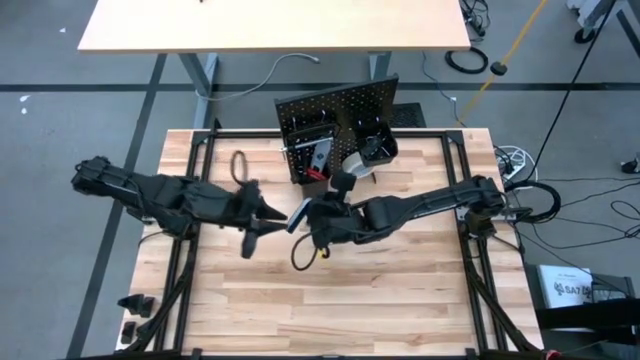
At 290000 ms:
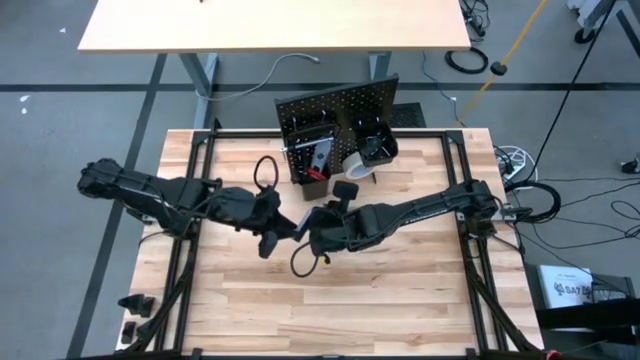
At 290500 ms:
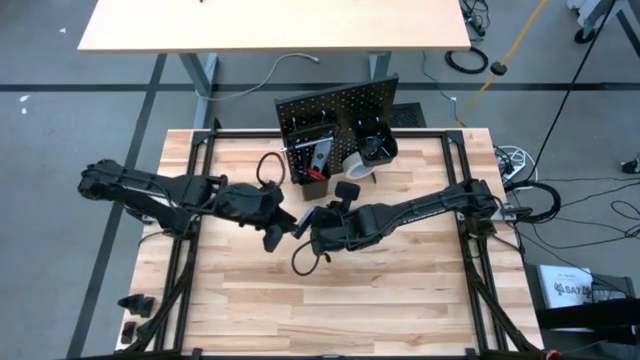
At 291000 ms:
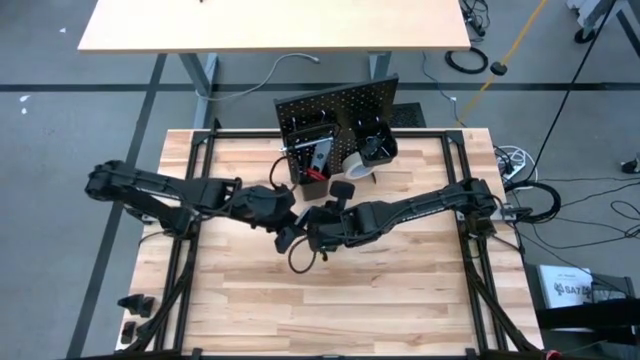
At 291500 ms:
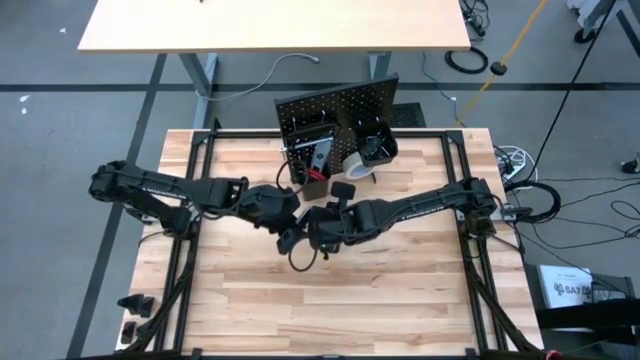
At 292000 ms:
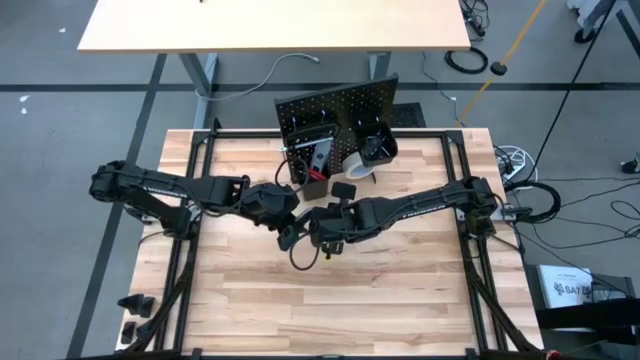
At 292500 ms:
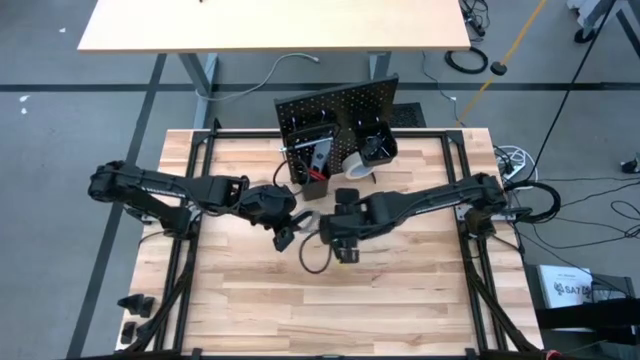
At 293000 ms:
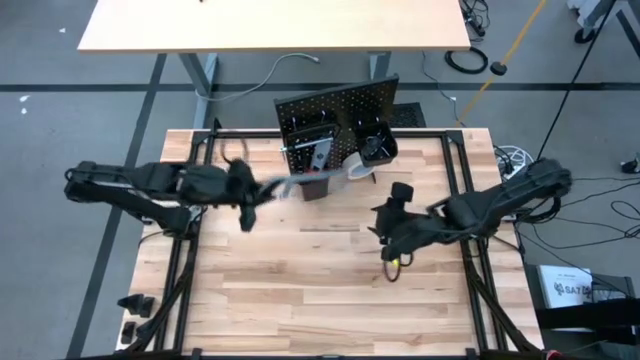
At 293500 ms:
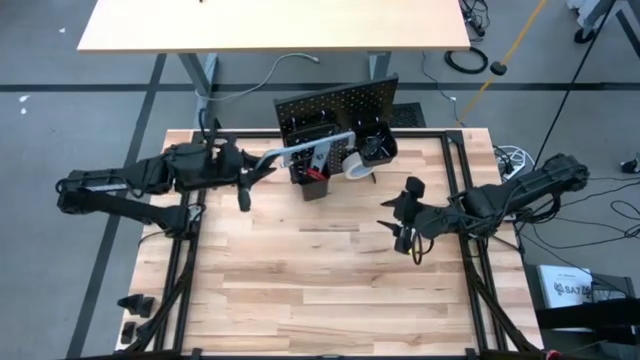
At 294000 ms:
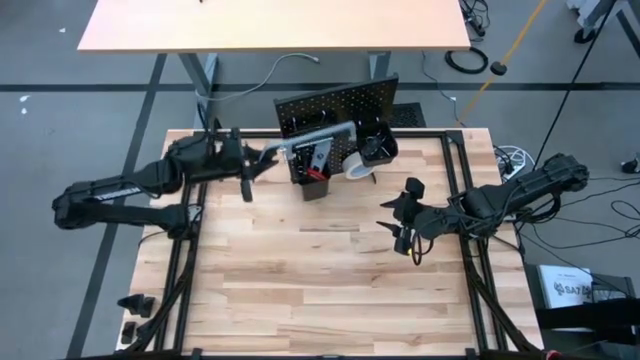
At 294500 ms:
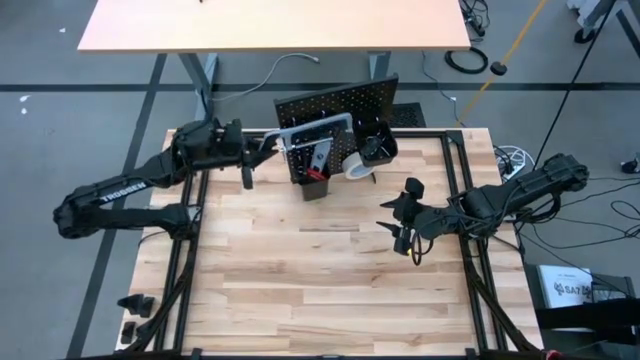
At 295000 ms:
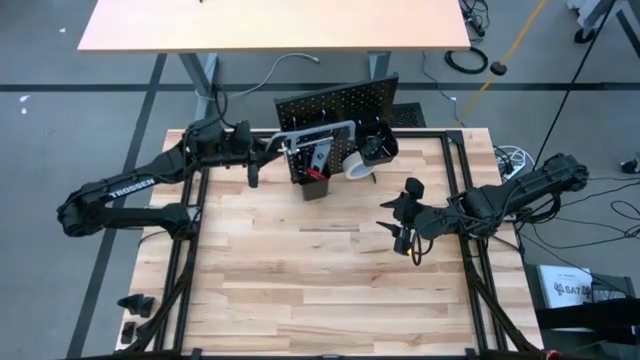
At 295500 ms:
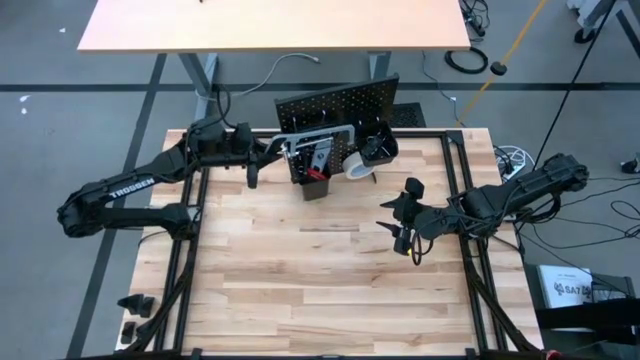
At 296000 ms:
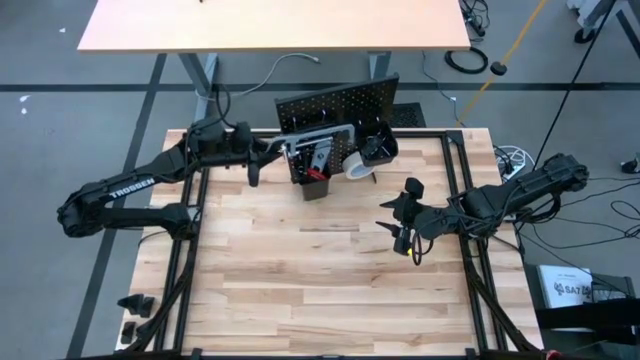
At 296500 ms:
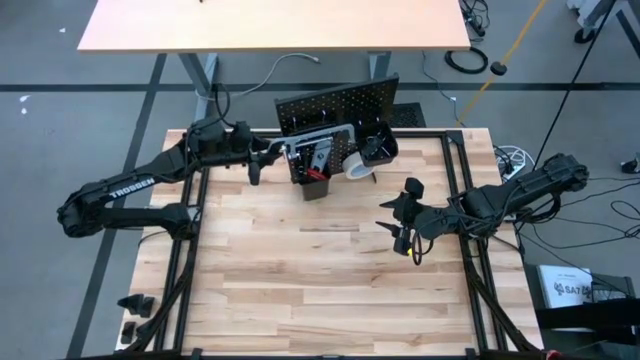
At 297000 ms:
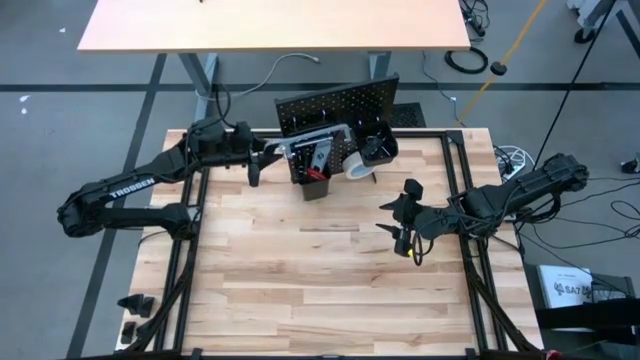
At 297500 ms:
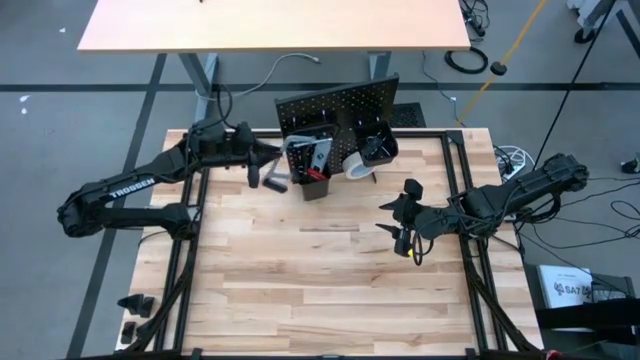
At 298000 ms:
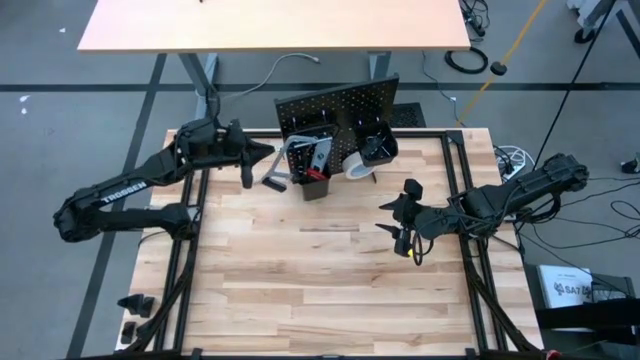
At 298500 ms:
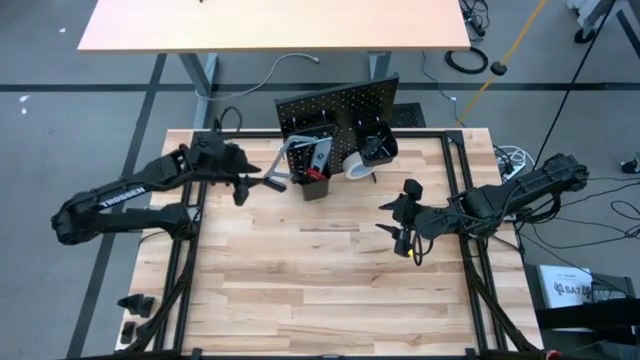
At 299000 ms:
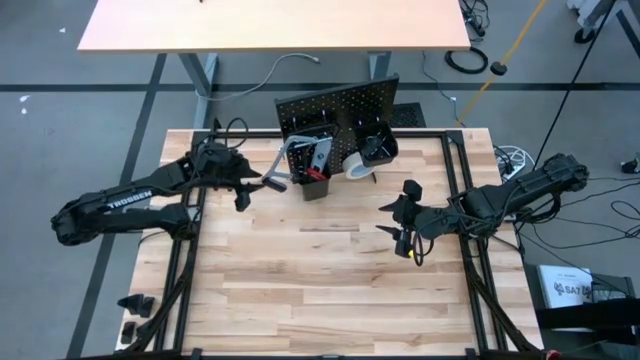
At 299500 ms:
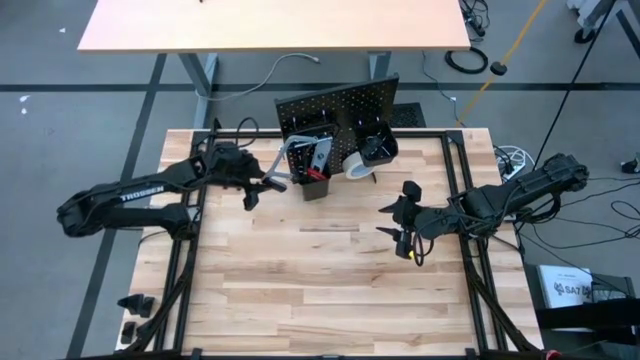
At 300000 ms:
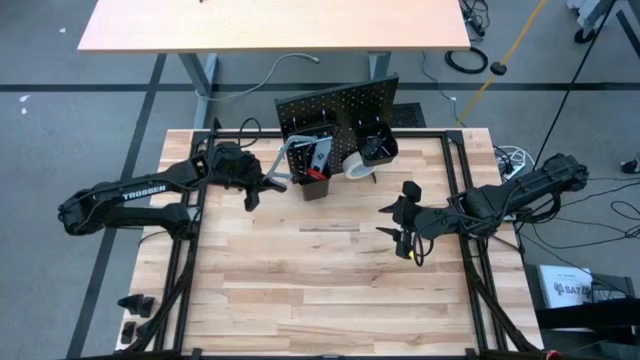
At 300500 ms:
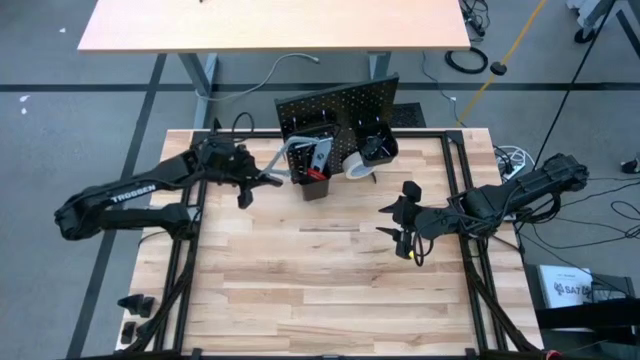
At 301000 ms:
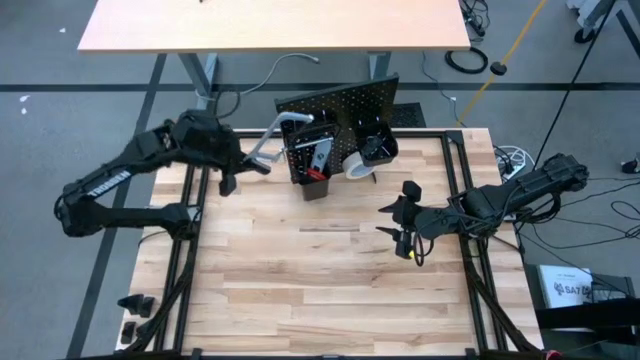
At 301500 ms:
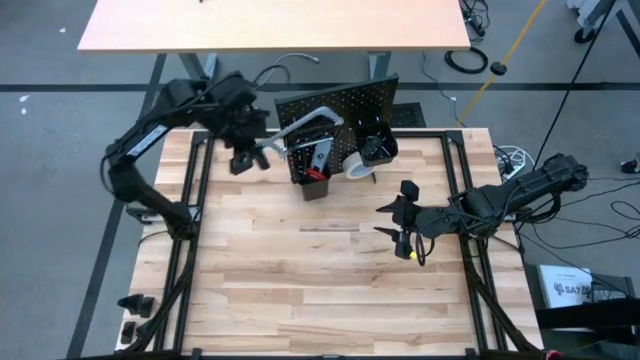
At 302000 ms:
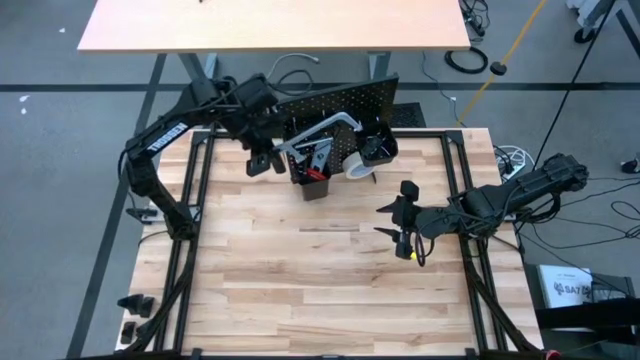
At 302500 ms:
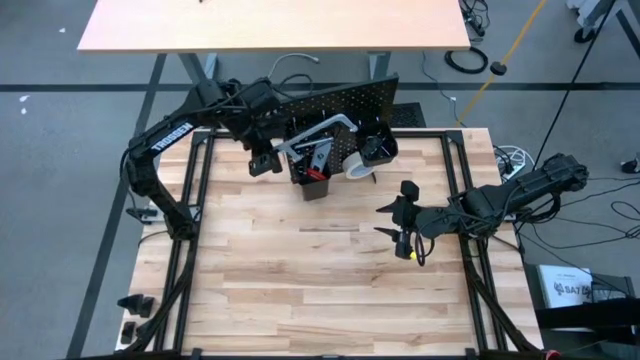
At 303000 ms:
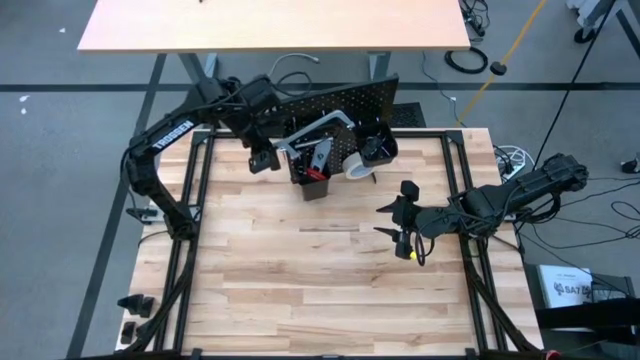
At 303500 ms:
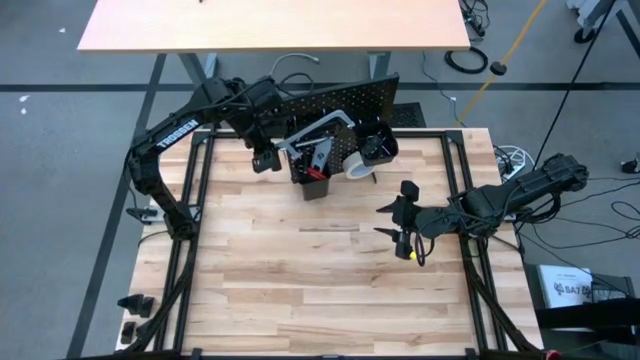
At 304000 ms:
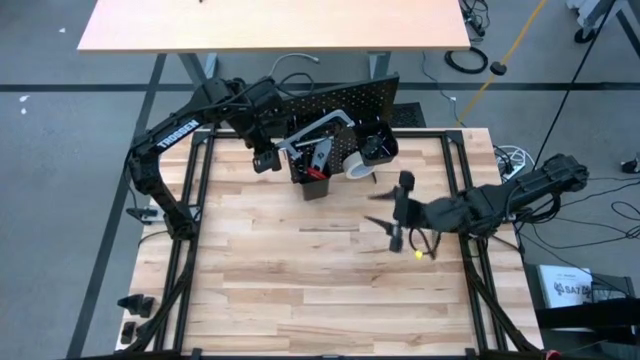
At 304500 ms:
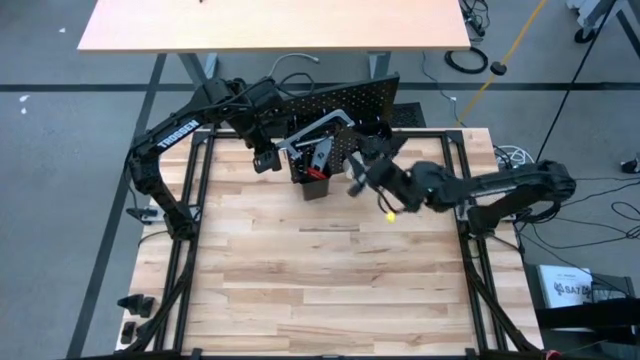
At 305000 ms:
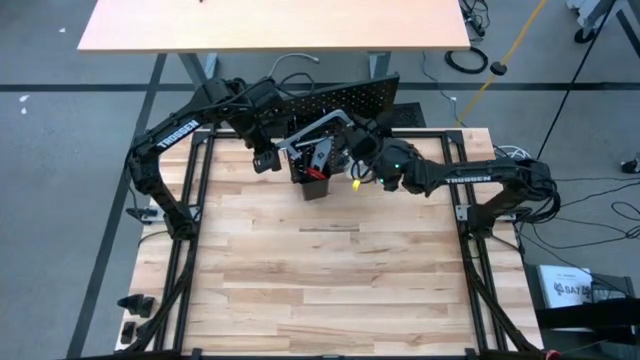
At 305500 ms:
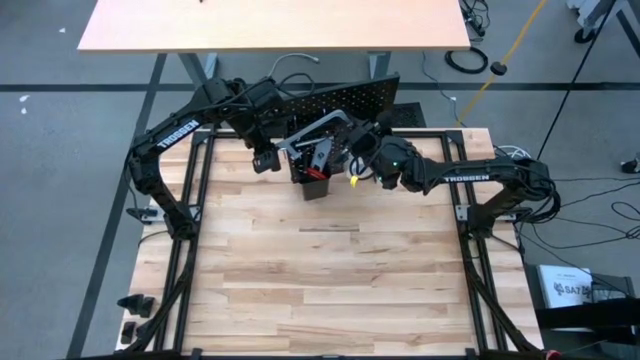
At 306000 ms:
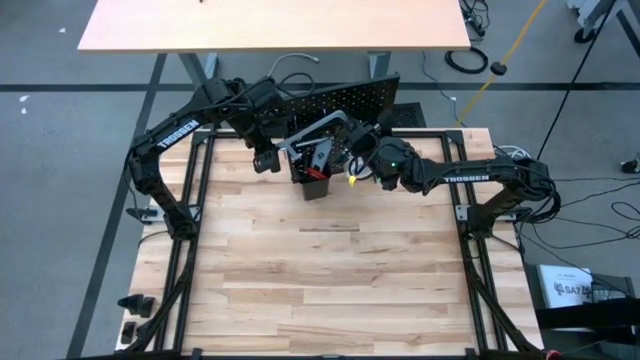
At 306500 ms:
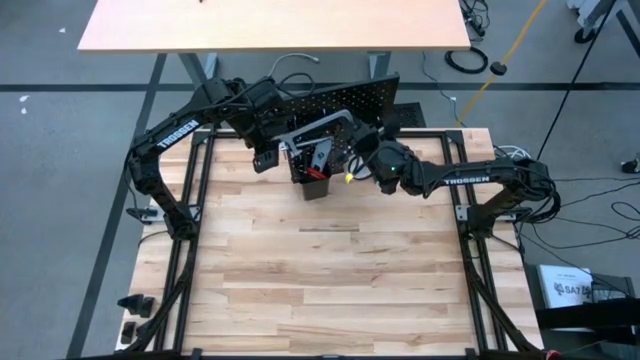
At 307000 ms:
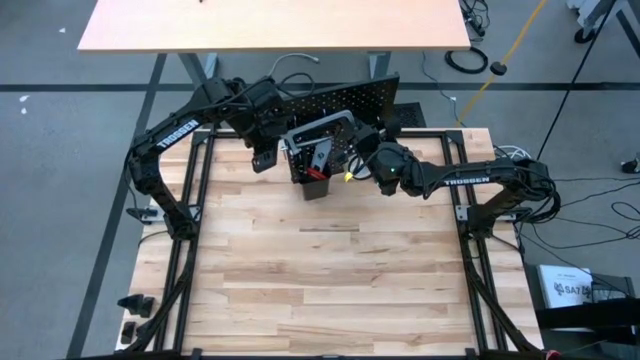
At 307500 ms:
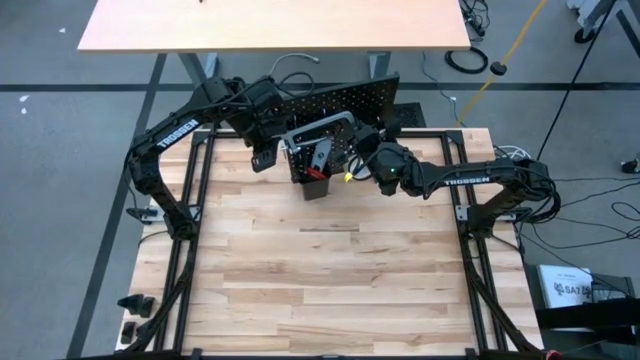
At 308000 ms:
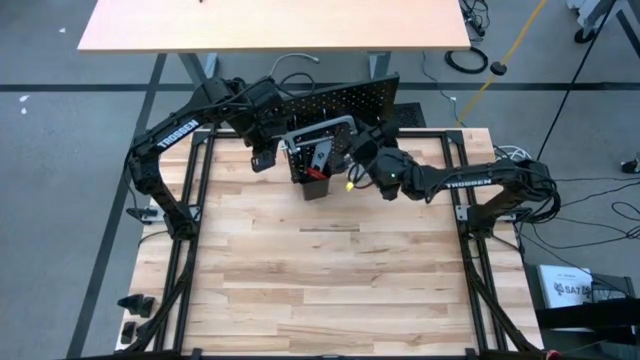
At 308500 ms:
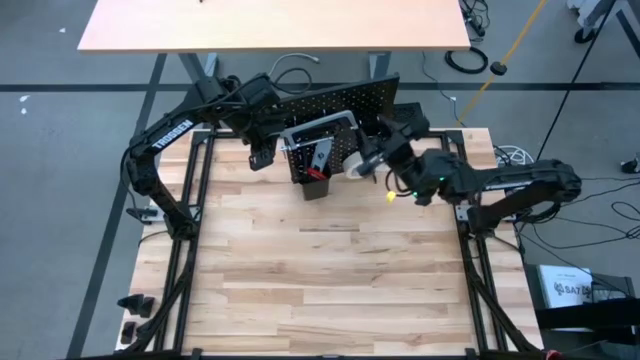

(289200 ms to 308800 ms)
Task: Hang tools onto peg board
Hang the hacksaw on the pegboard

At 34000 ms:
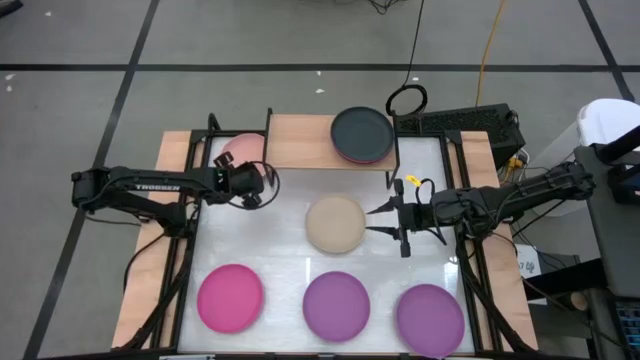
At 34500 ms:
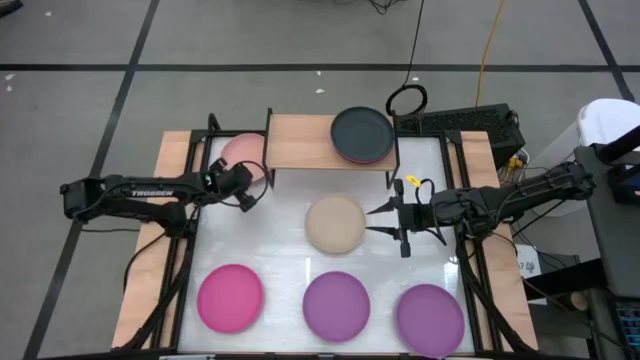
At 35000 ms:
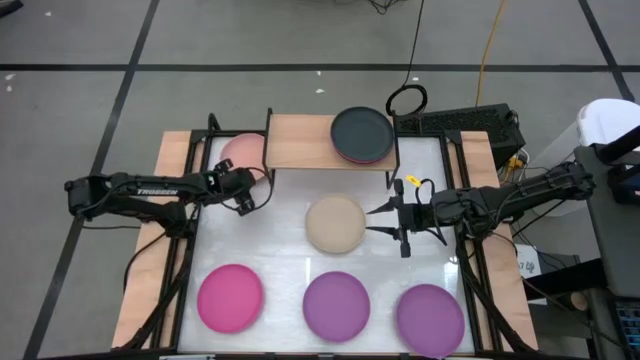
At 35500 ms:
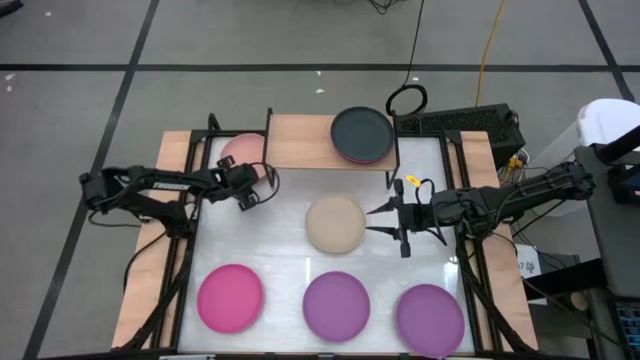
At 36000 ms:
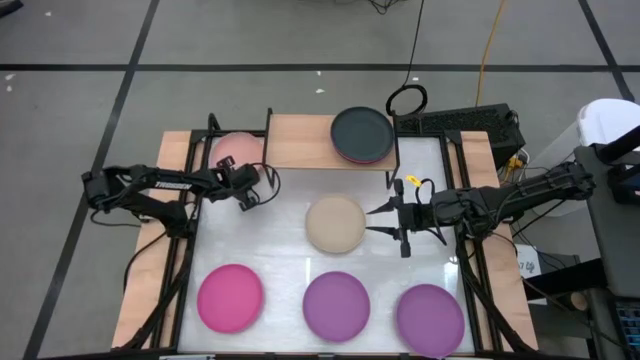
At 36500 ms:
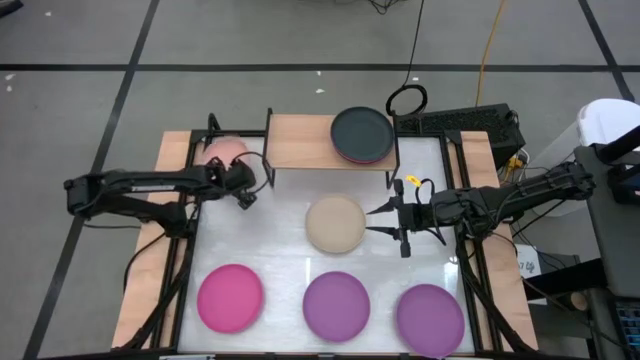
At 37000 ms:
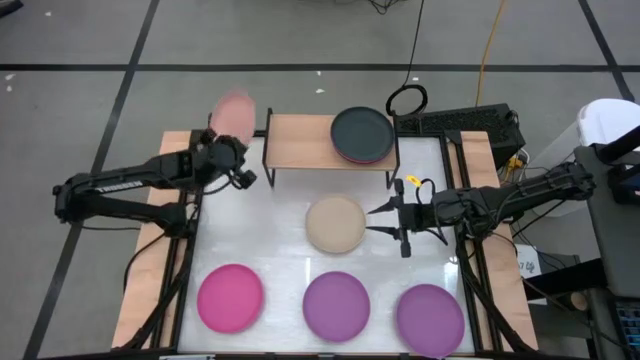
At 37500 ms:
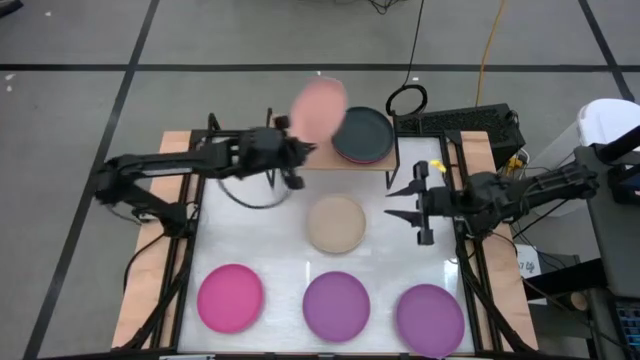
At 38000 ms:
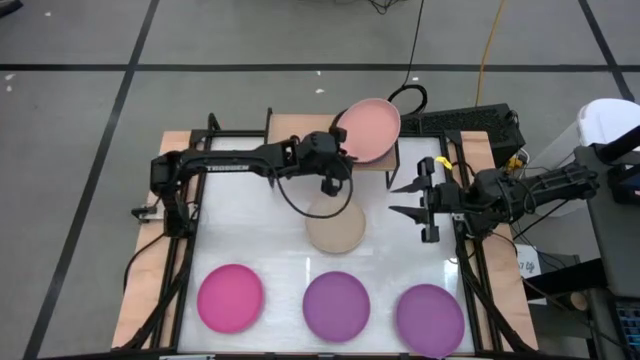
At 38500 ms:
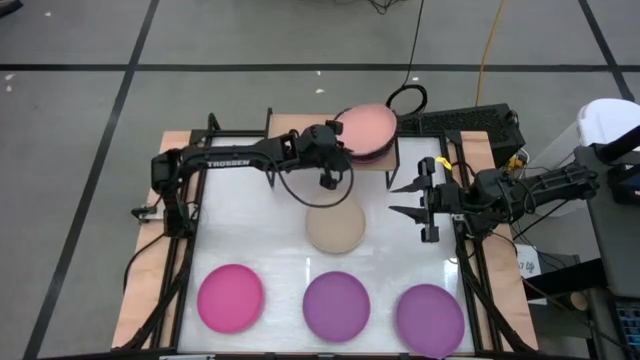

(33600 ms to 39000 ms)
Task: Place and stack plates onto a shelf
Stack the light pink plate on the black plate on the shelf
